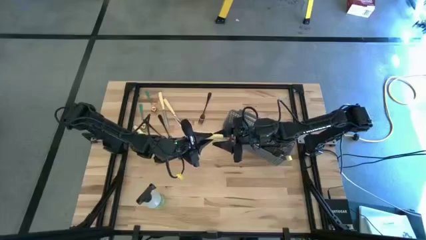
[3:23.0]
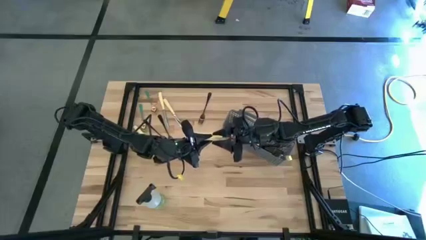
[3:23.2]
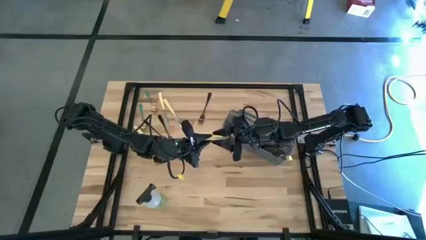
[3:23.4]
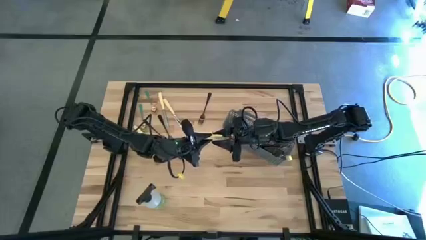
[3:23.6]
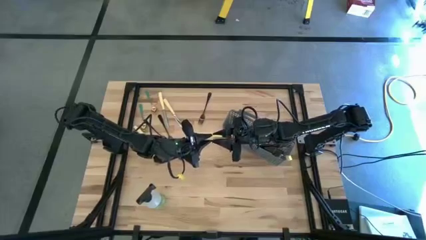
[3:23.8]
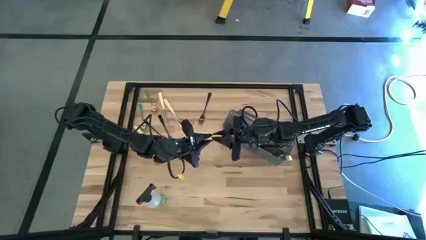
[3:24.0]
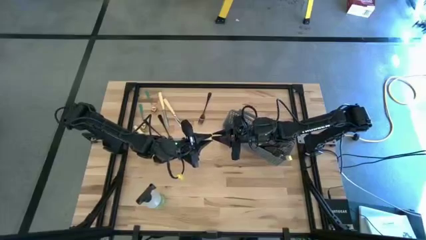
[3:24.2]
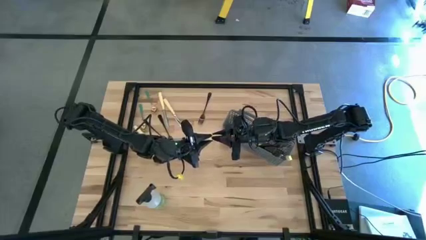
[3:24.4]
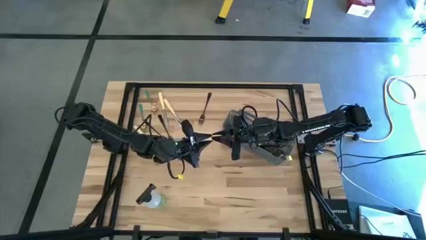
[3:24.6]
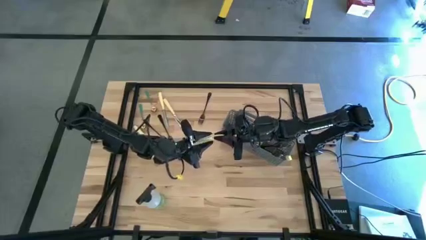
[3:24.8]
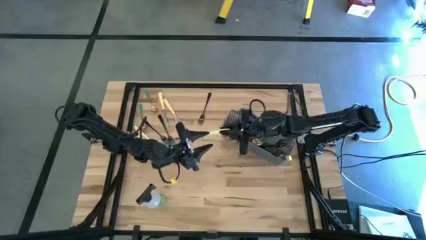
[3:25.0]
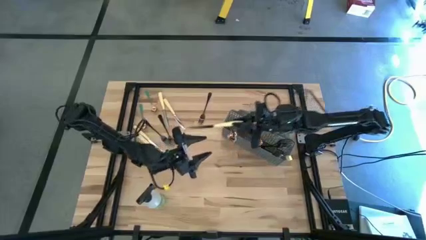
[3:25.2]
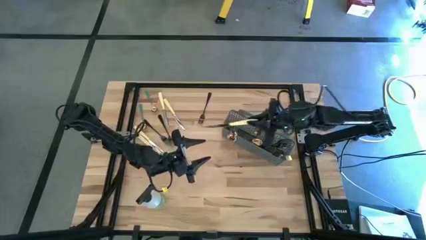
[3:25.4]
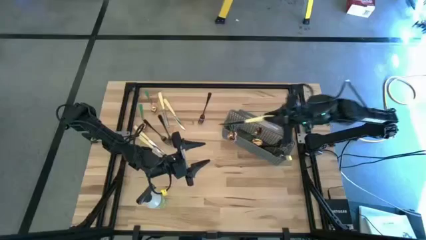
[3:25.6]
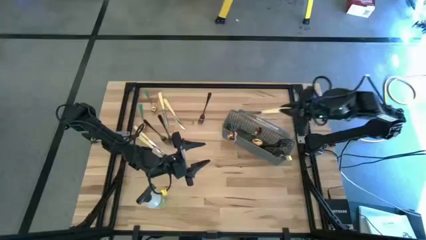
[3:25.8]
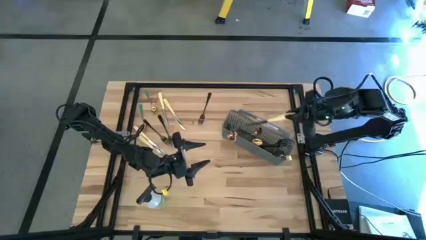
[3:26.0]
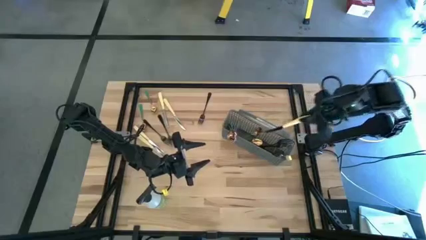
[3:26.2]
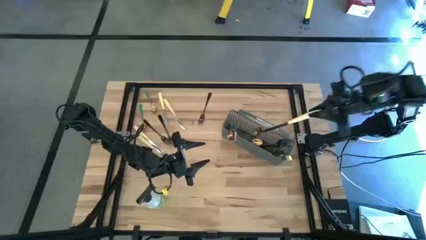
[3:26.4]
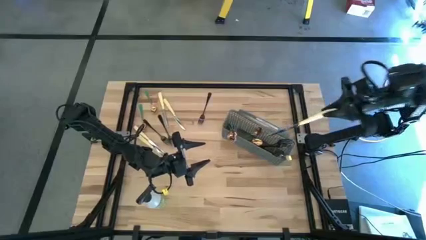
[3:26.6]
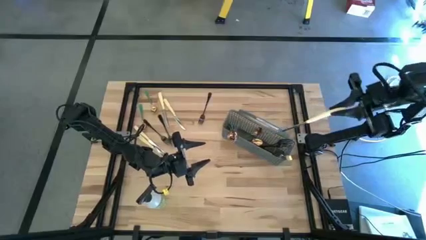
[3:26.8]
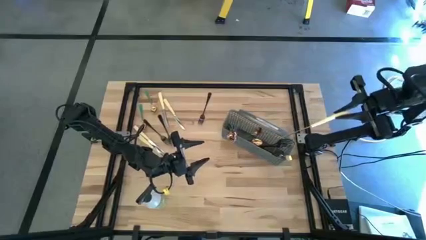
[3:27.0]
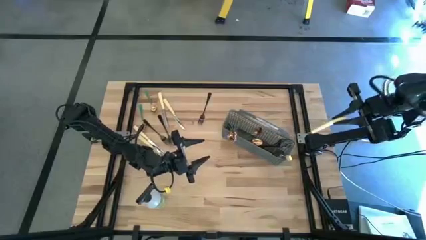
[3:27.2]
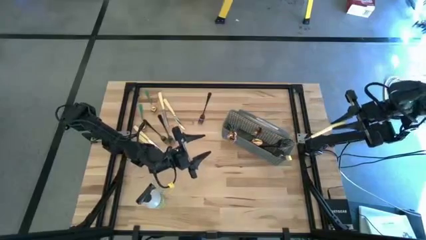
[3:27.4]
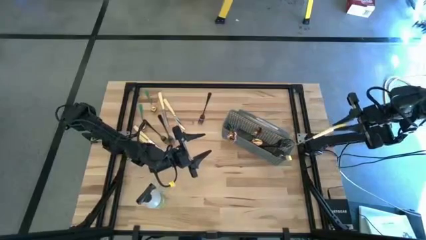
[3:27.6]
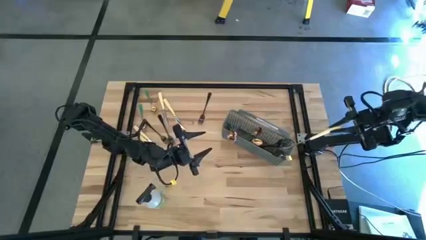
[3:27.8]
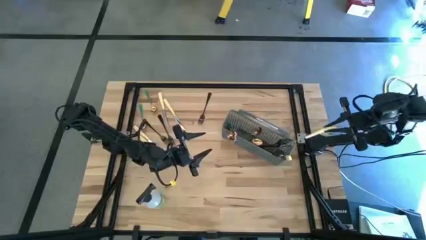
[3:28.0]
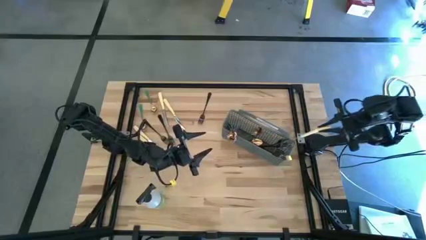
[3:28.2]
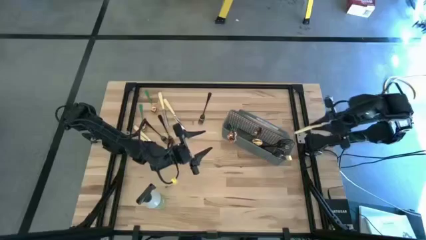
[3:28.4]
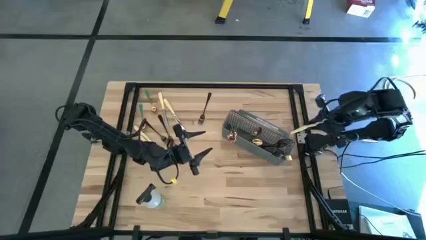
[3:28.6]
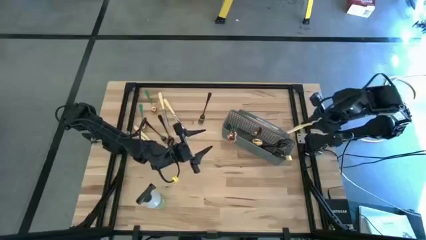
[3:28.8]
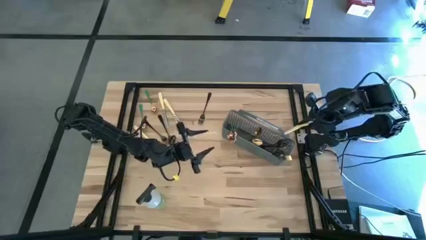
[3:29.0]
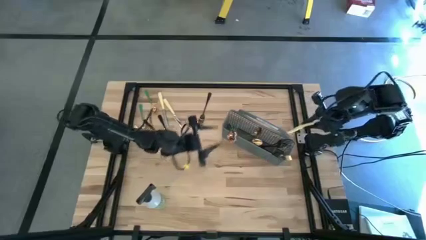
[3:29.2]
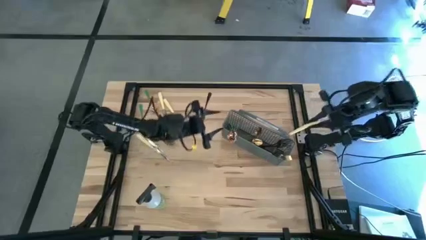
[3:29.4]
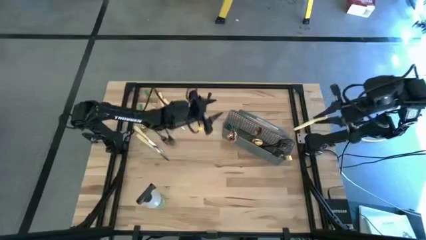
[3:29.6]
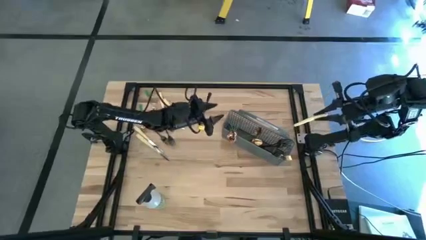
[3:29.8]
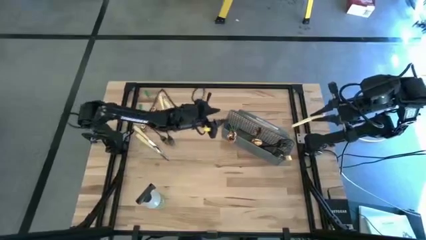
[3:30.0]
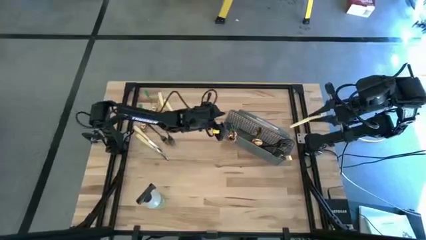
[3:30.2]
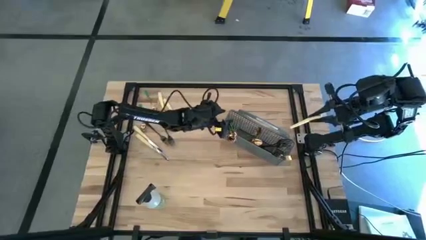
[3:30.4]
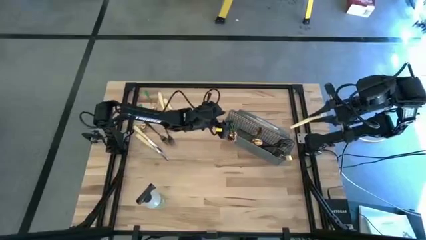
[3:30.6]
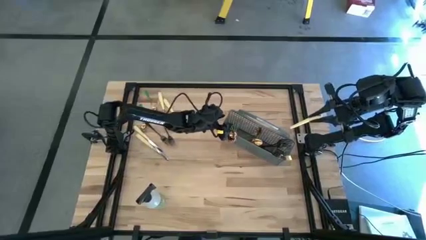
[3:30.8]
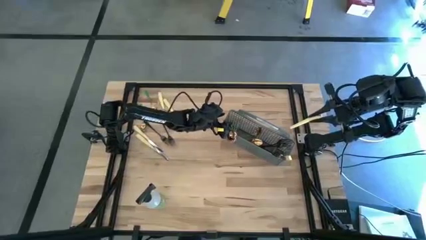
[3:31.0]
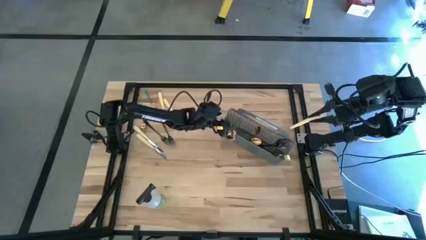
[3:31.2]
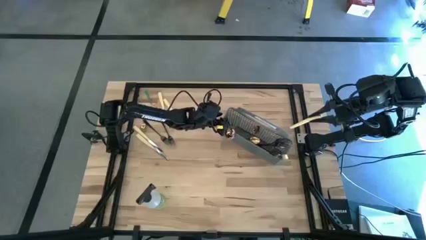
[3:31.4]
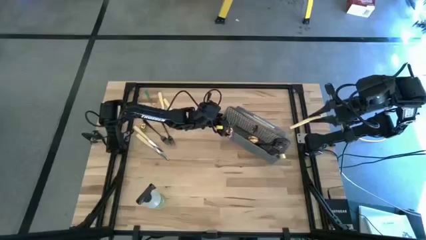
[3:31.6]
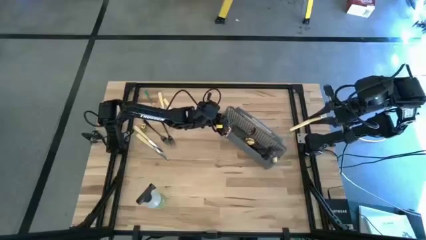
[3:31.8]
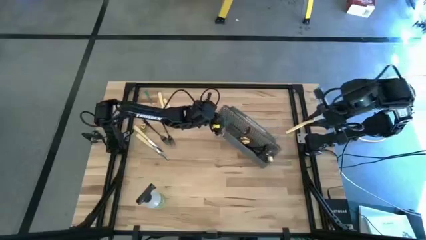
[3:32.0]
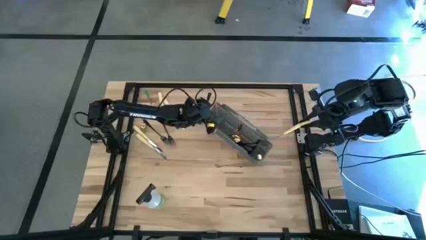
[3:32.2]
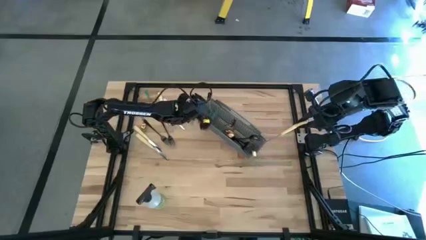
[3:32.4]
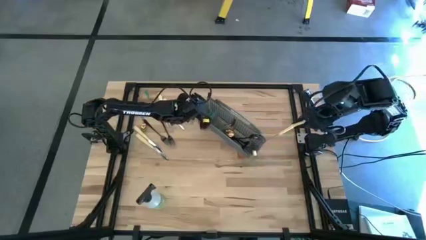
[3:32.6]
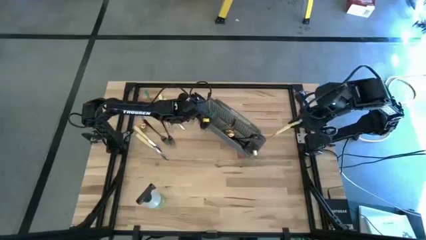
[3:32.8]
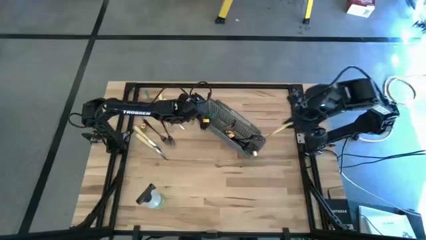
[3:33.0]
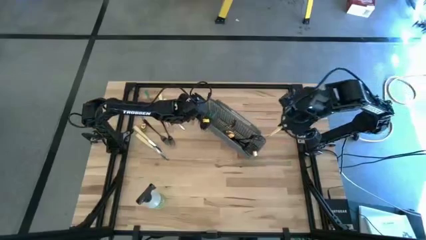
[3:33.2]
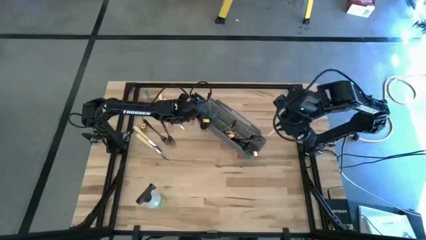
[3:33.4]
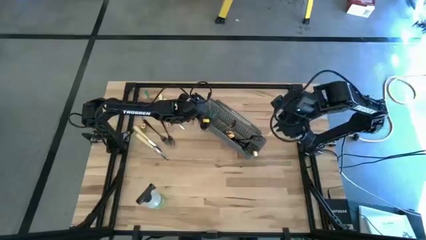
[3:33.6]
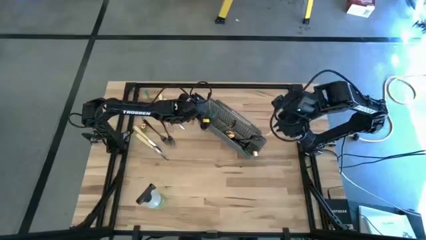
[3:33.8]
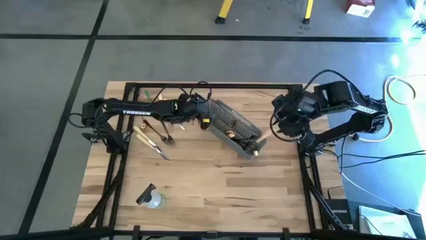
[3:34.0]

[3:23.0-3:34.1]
Task: Sort silverware
Put the silver knife into the cutlery rack

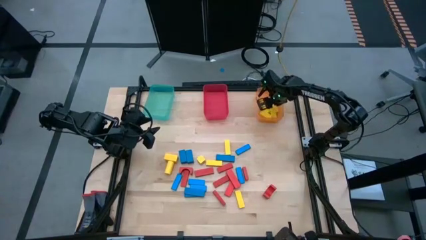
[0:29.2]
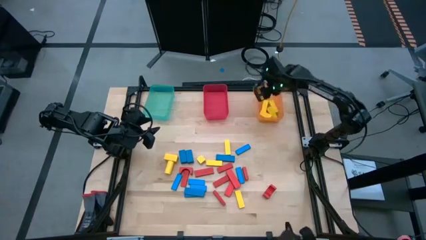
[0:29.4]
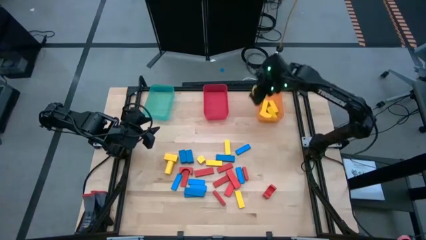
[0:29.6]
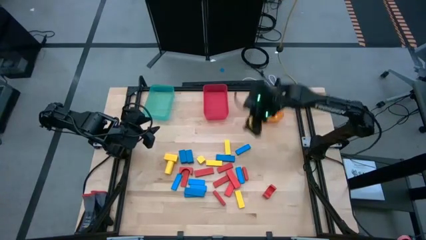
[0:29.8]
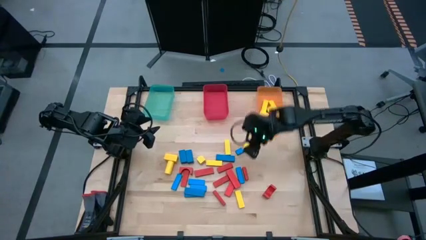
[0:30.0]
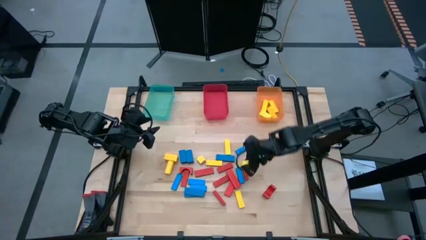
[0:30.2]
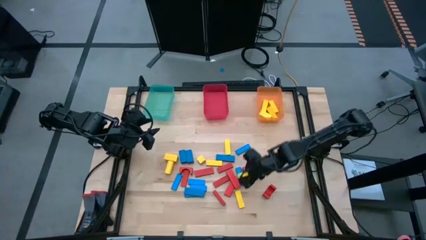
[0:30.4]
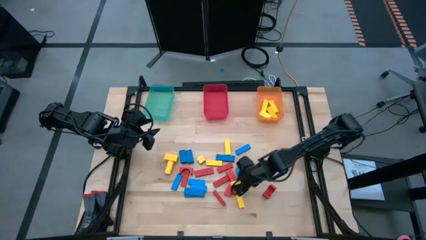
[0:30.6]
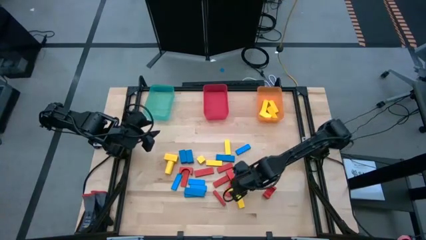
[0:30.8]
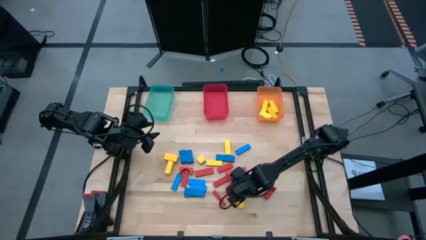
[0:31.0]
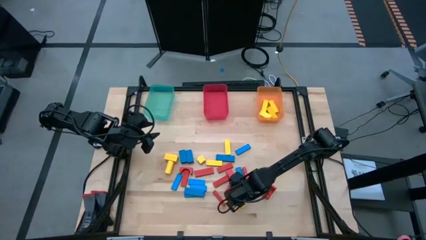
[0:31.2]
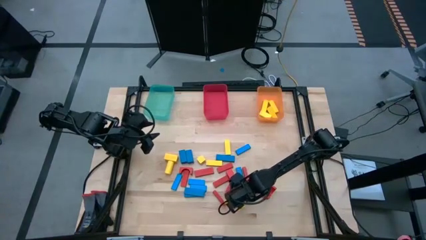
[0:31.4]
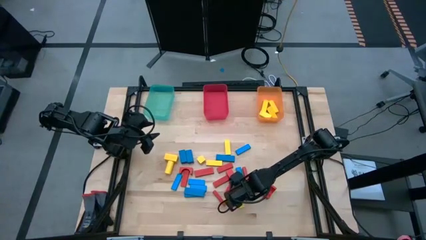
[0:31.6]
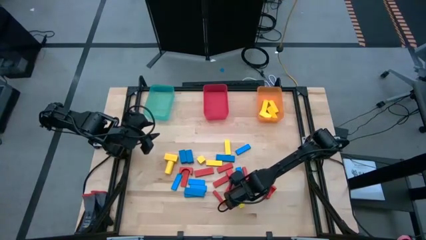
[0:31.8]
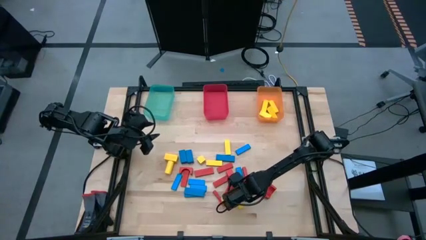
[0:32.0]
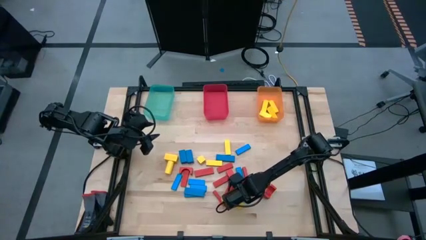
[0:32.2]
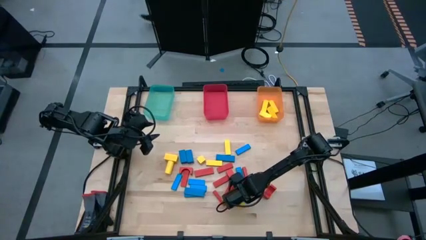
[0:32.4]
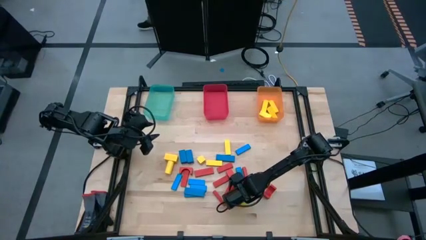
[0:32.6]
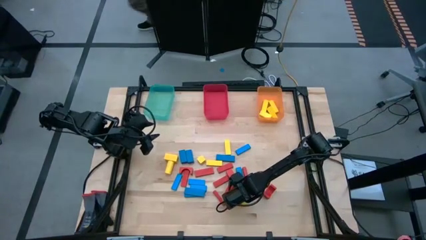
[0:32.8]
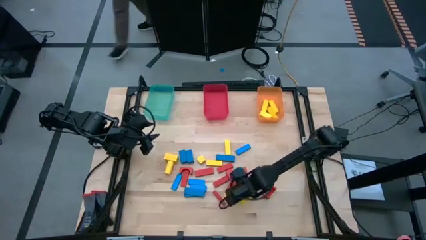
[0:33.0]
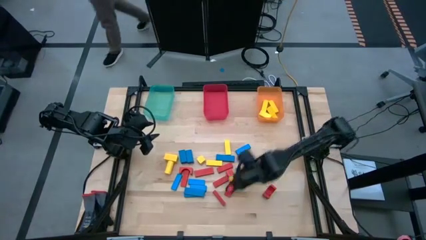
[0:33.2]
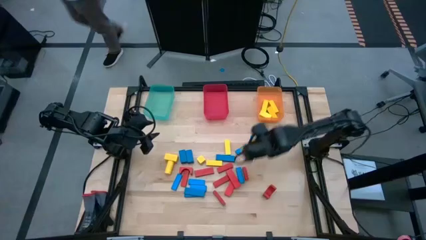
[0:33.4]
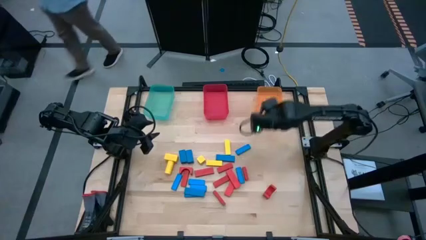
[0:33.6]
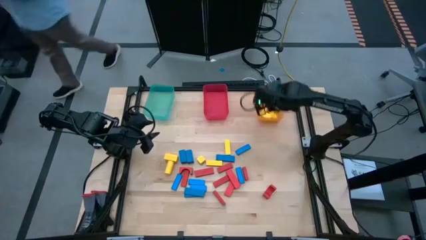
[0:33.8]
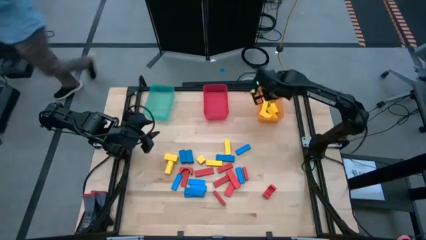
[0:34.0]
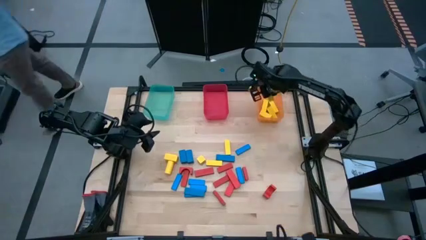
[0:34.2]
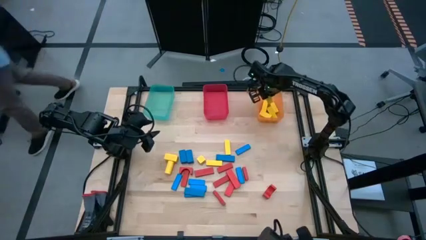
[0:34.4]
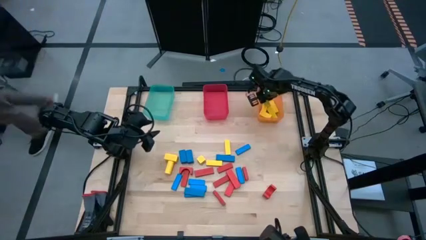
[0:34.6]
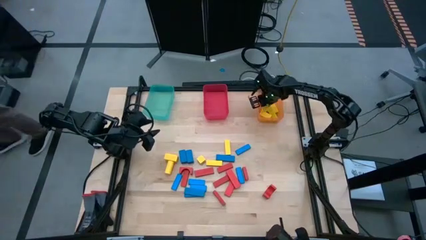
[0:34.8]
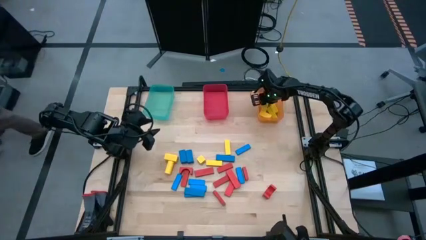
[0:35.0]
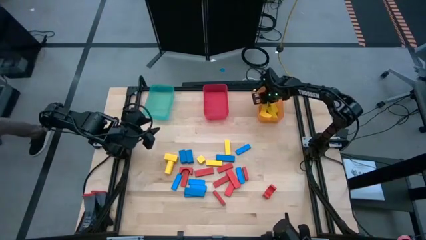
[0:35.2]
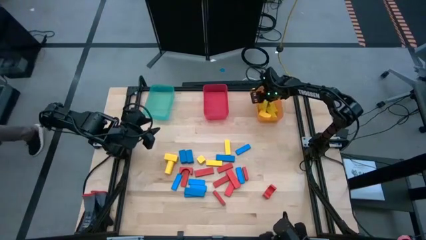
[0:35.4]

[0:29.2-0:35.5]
Task: Sort blocks
Put the yellow block into the orange bin
